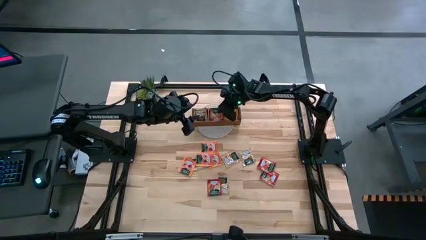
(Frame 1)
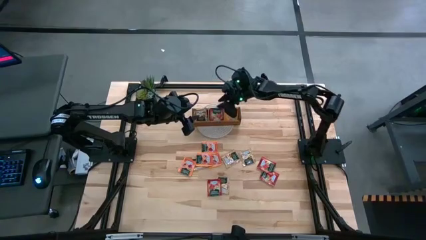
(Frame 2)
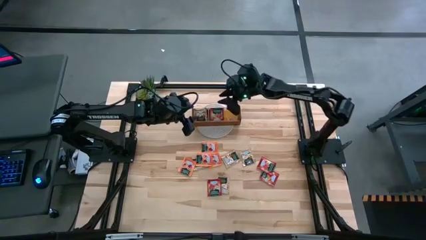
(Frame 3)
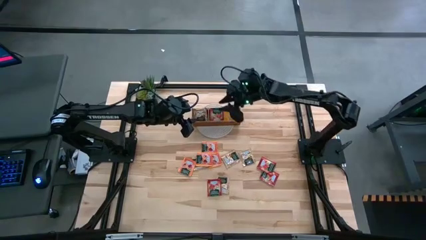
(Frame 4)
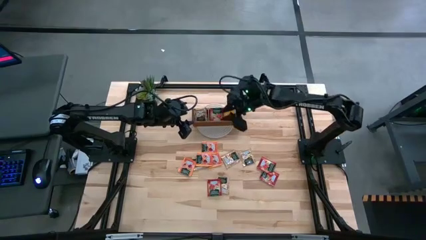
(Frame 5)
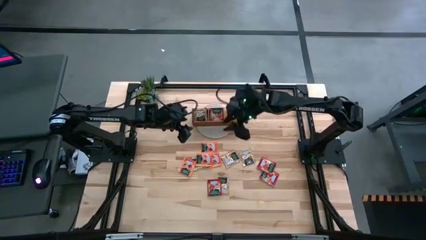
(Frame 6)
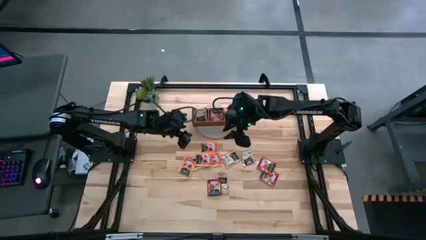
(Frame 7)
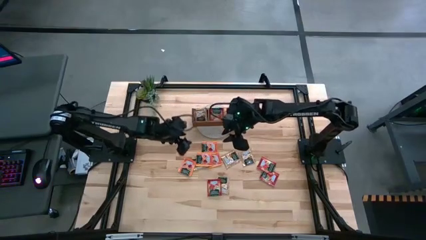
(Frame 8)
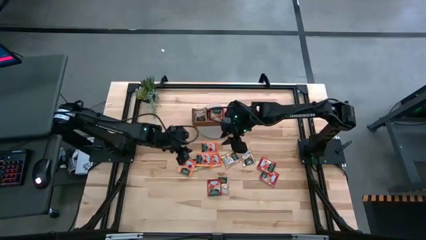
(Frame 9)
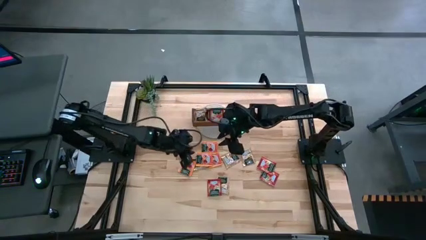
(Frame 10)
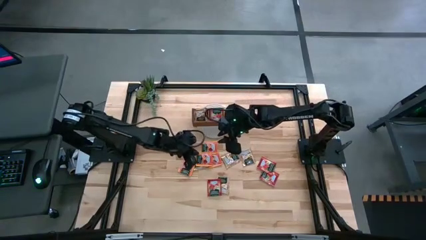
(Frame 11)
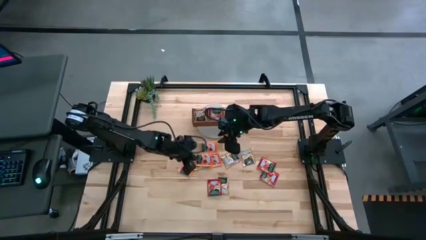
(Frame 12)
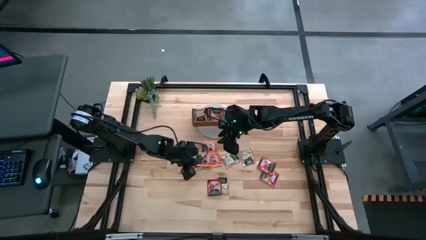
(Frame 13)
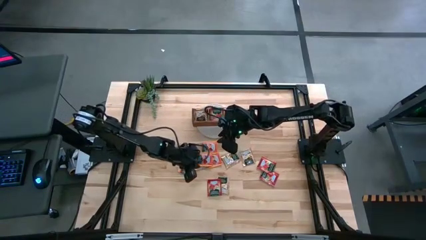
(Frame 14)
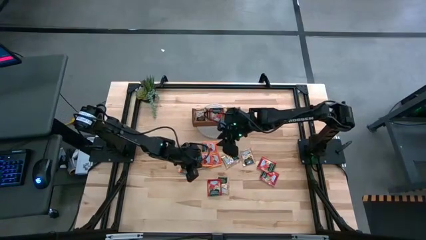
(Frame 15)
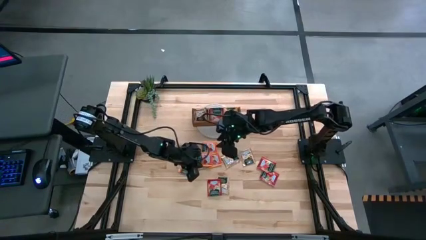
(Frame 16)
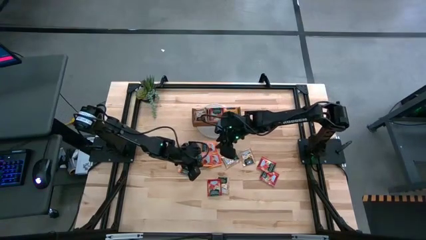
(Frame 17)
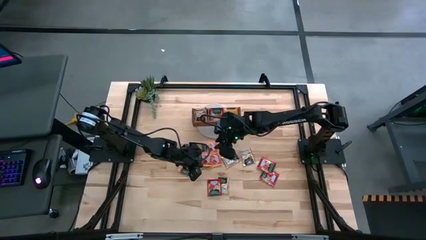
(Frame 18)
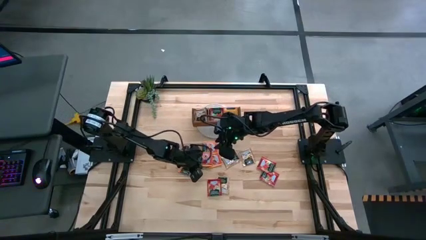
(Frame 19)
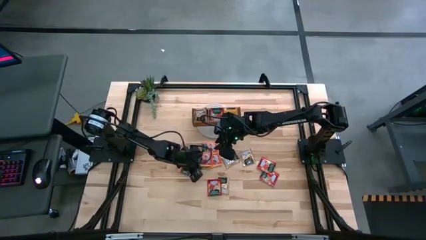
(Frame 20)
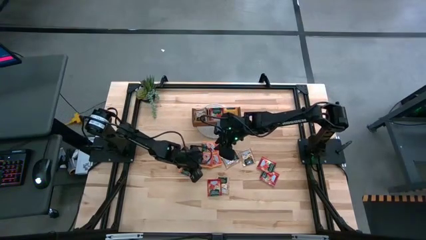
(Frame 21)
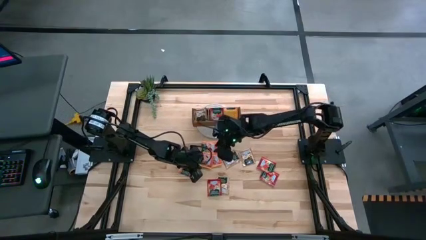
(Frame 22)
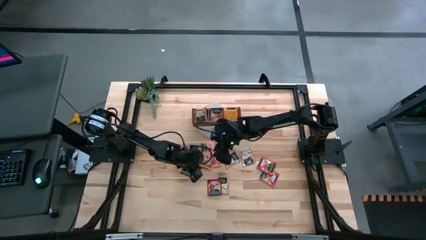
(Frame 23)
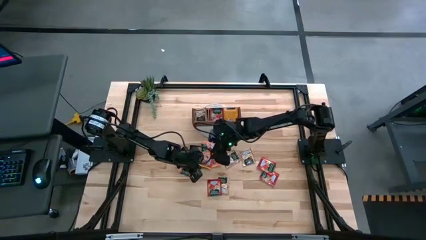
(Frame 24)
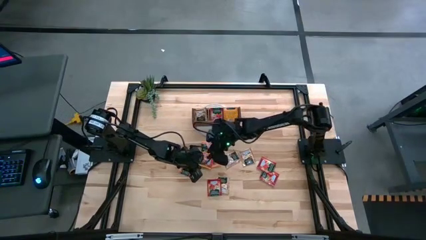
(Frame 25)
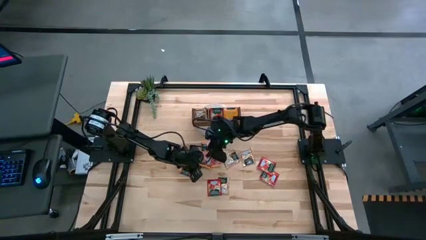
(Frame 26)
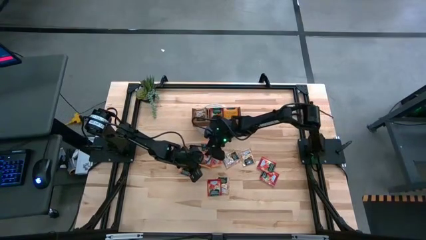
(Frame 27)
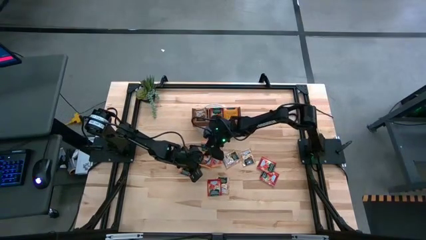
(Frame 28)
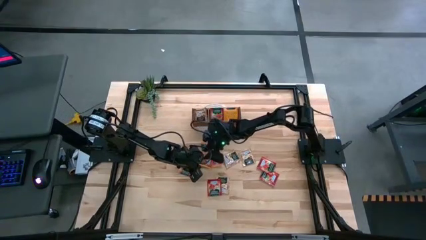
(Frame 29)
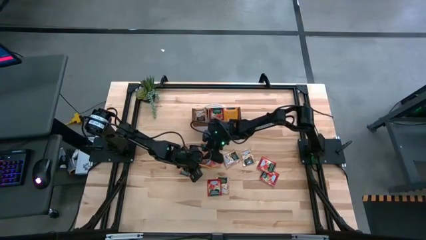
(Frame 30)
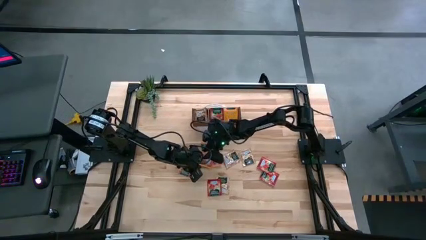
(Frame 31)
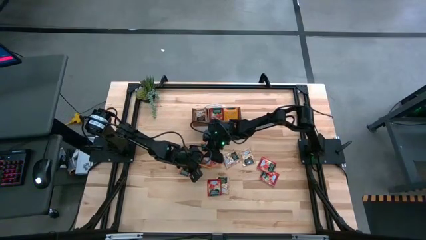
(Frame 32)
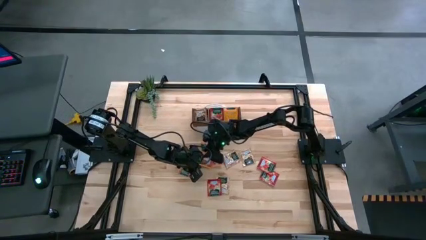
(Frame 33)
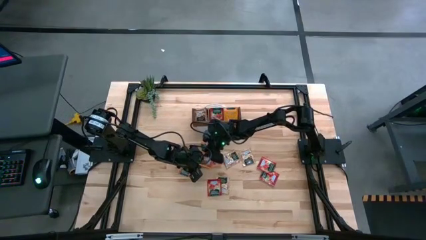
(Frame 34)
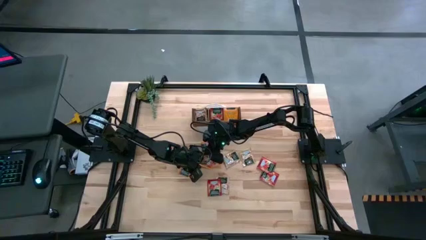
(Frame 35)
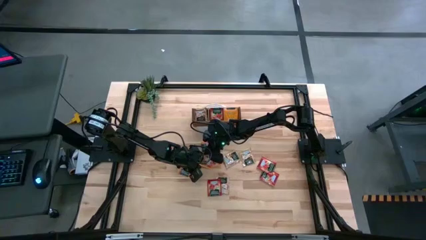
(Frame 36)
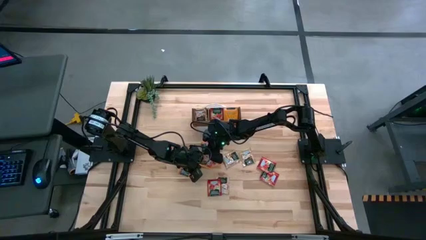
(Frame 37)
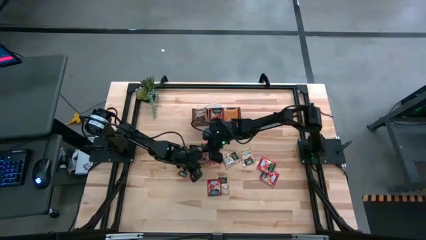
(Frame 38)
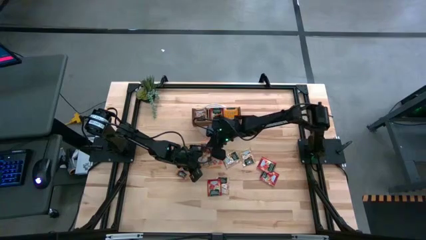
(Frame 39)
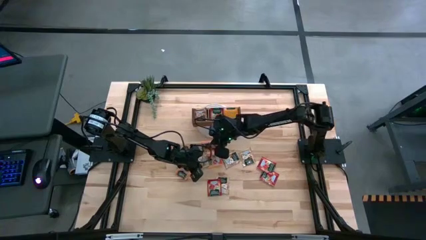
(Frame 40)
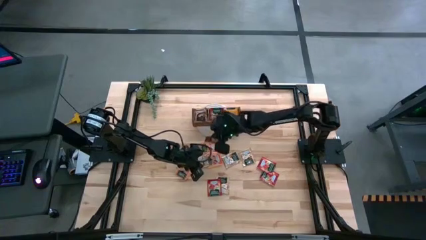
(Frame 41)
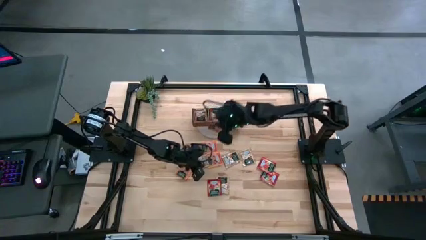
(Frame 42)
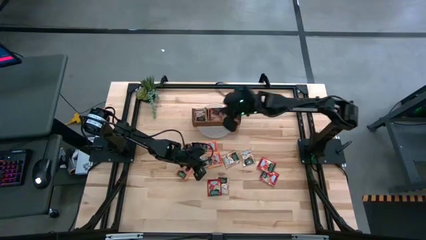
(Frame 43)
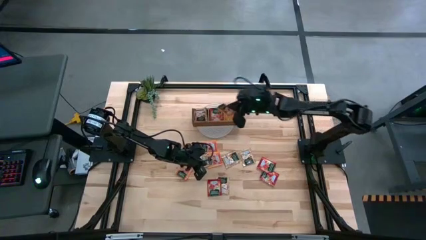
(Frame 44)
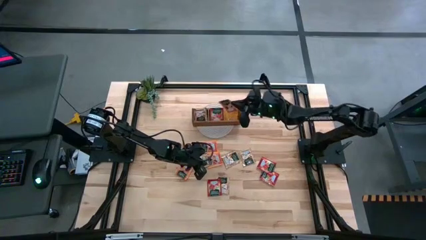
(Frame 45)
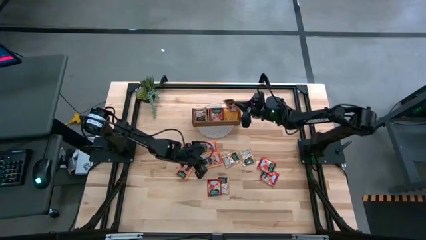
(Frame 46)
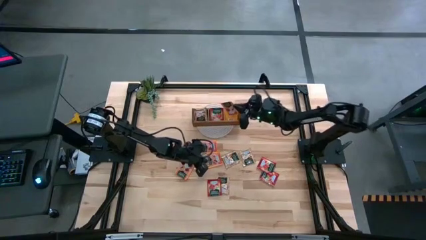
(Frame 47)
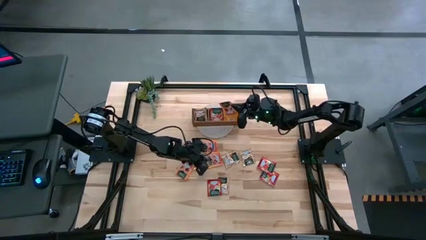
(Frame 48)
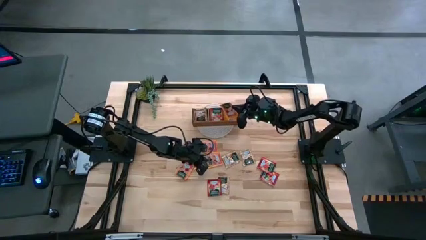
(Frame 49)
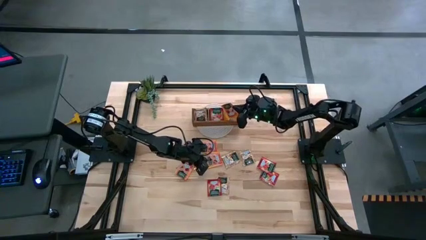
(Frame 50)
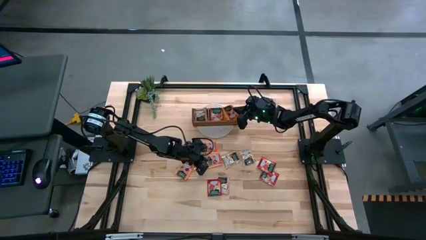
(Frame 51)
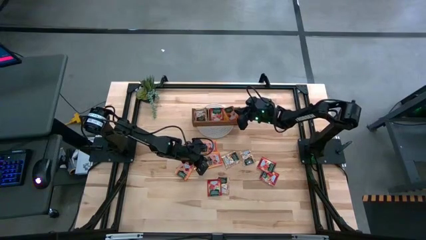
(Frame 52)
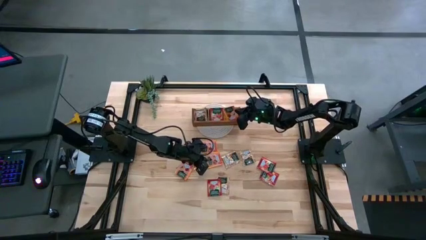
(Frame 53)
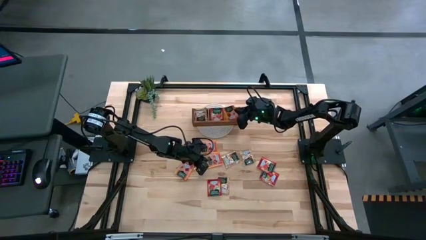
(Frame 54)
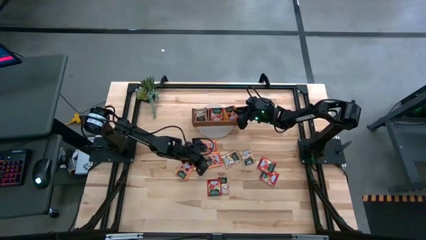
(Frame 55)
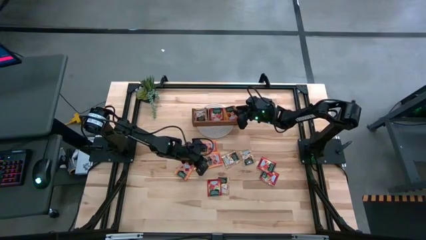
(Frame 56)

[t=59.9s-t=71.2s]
Task: Pick & Place Tea
Put the orange tea bag in the right section of the wooden organizer

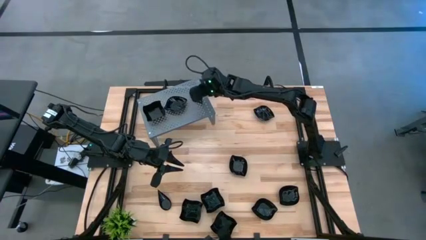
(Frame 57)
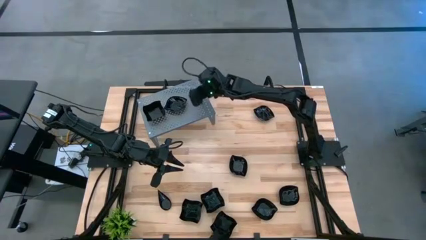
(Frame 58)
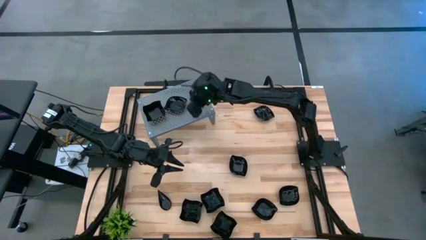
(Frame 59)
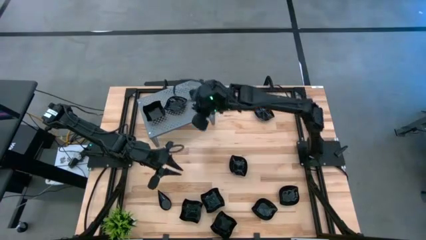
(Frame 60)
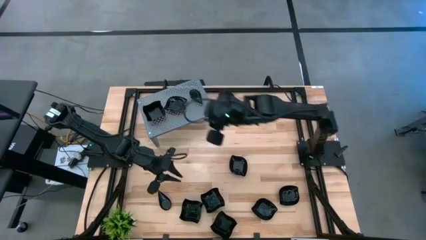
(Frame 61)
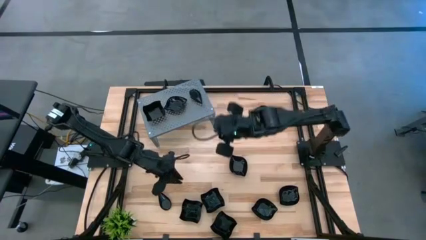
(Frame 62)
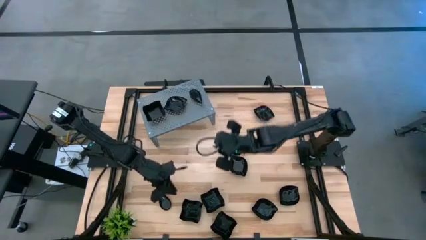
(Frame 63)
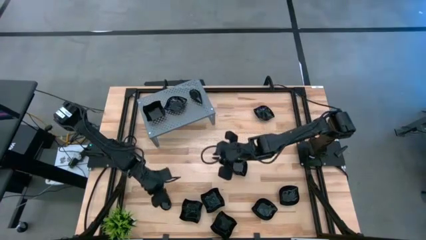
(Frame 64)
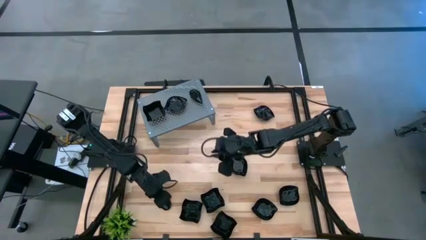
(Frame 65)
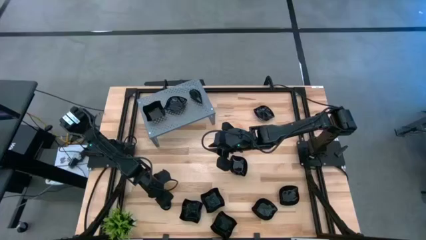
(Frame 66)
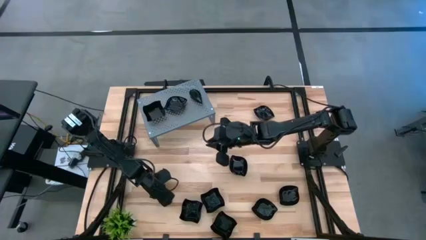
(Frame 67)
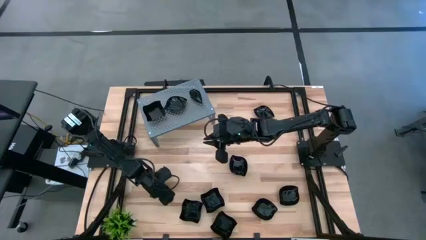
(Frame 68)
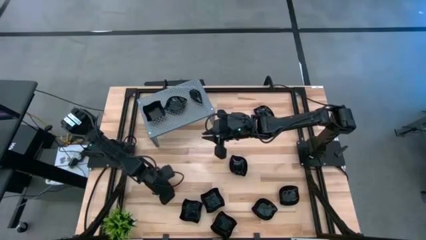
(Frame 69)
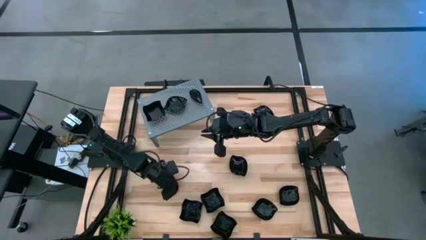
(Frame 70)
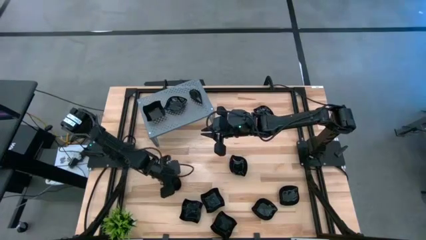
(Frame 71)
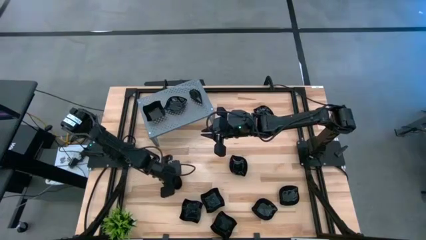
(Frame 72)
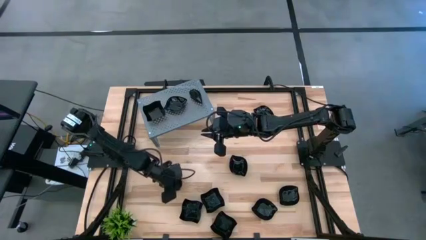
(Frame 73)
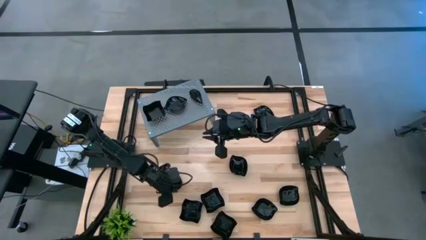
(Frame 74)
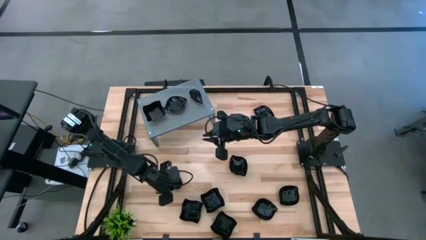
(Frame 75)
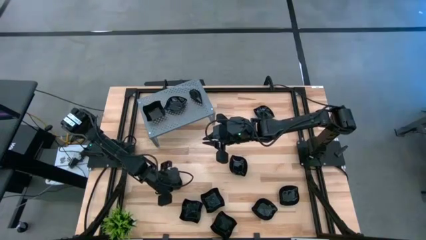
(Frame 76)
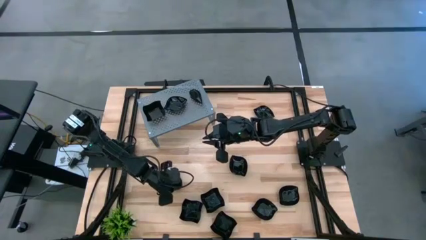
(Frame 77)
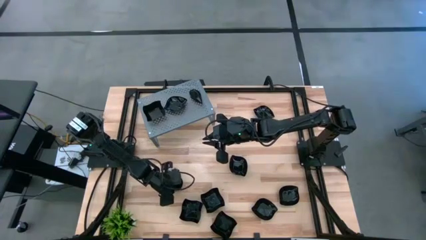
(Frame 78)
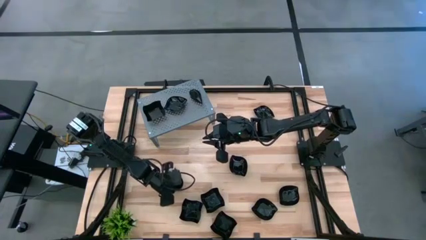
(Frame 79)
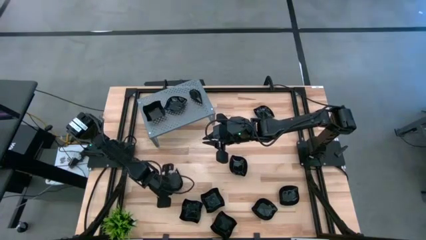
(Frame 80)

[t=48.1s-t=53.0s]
Task: Pick & Place Mini shaped plates
Stack the black drop shaped plate on top of the black drop shaped plate on the shelf

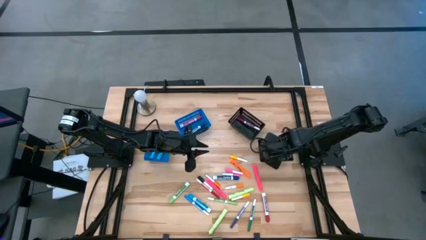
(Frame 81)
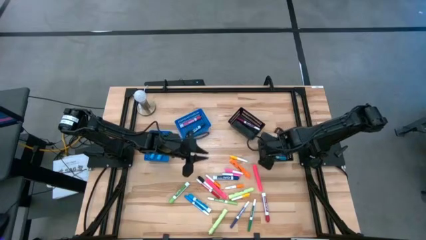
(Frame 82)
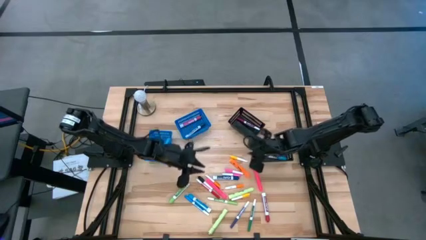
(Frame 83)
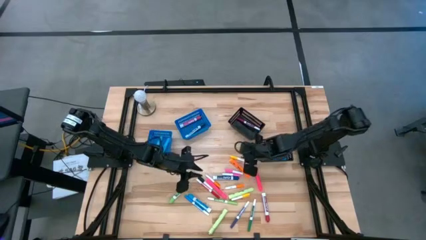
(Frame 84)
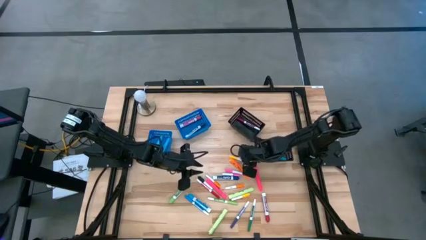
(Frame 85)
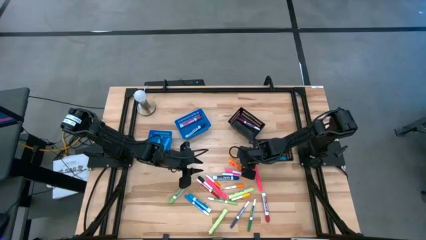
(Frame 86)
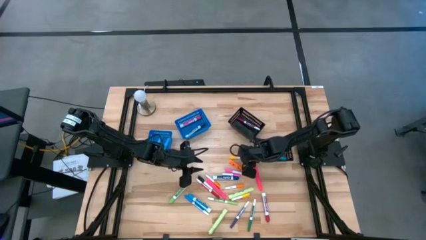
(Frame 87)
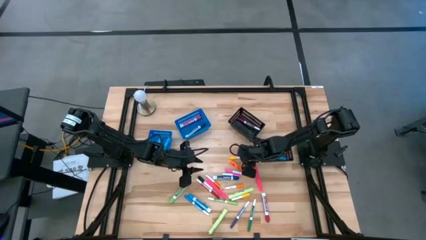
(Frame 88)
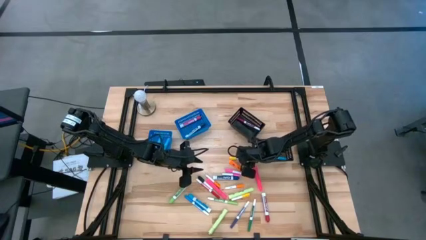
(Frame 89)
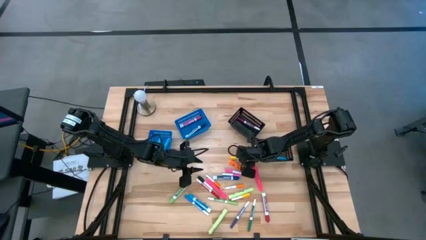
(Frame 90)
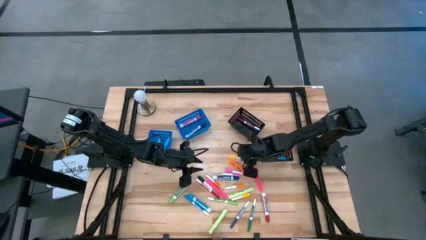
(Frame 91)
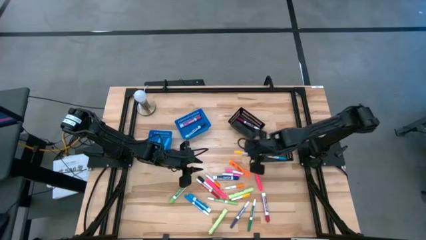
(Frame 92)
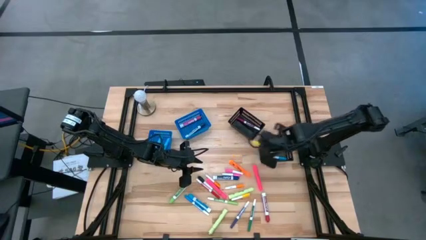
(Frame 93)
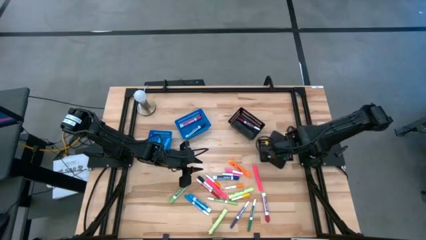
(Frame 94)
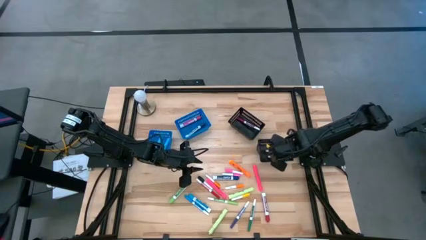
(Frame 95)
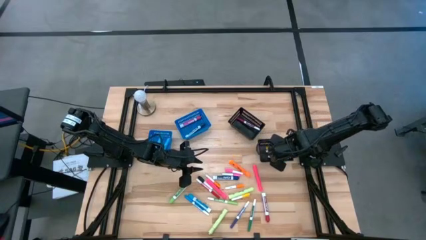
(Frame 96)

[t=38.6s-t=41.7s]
Task: Pick & Place Markers
Put the top yellow highlighter pen into the bottom black bin
